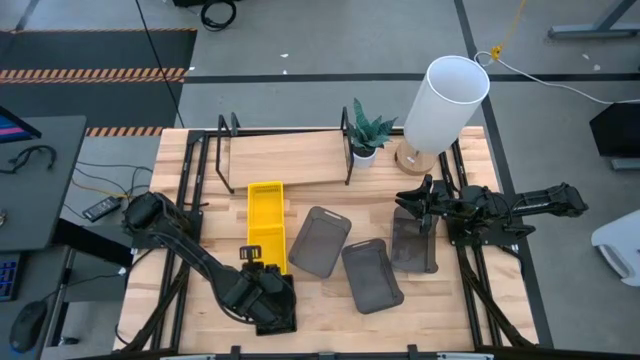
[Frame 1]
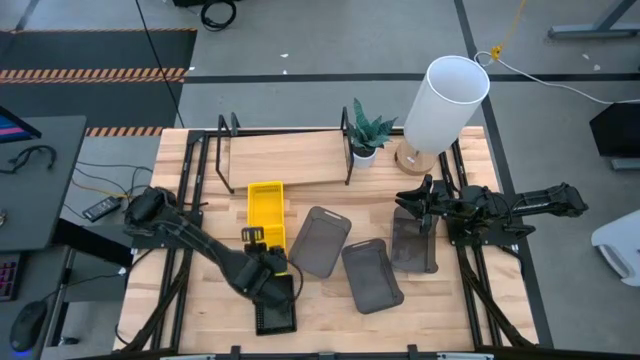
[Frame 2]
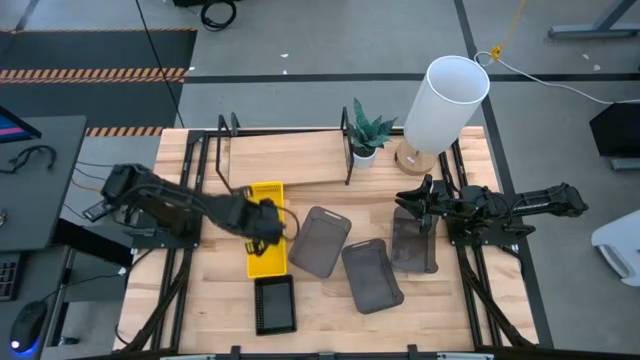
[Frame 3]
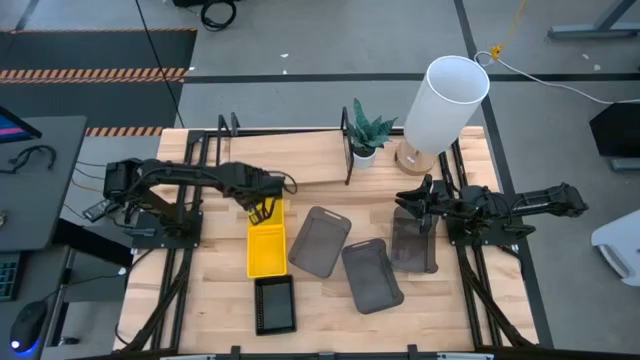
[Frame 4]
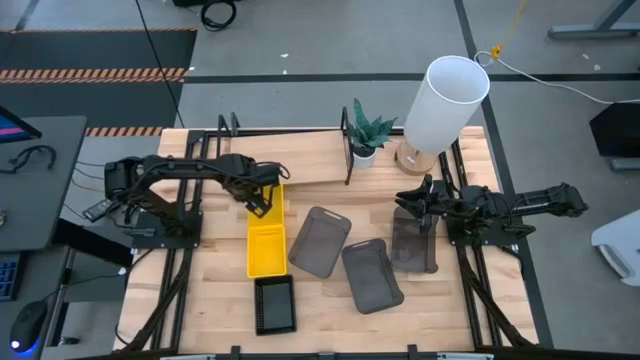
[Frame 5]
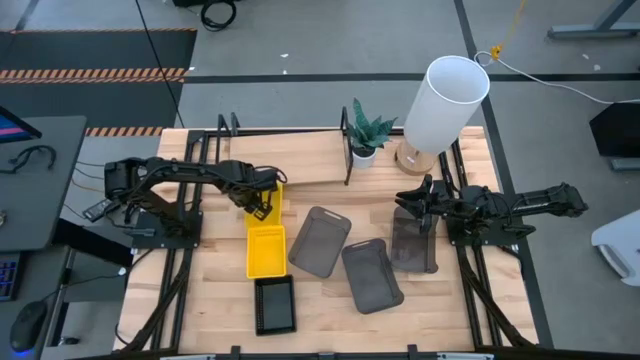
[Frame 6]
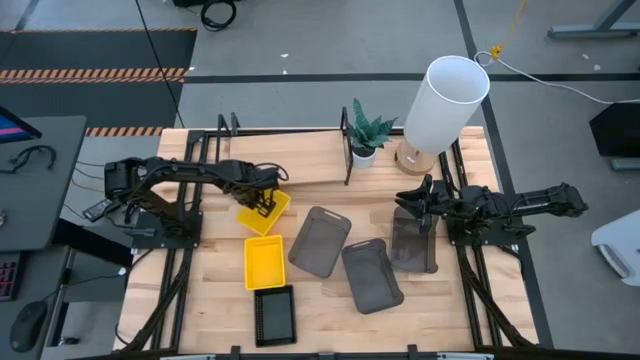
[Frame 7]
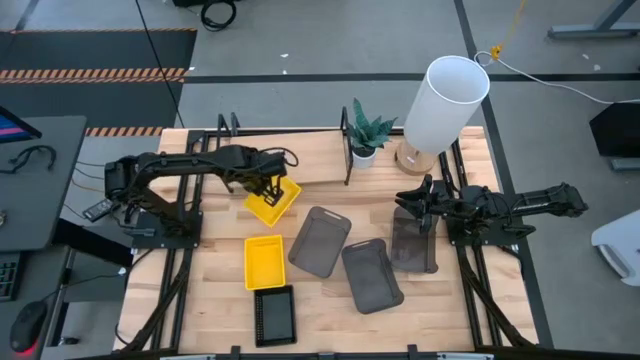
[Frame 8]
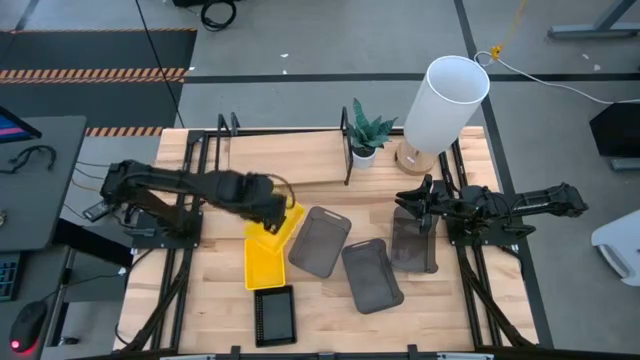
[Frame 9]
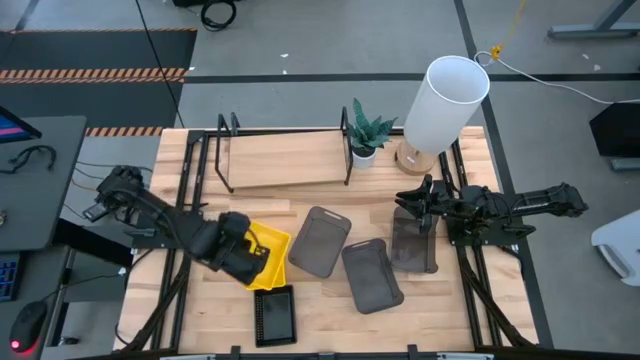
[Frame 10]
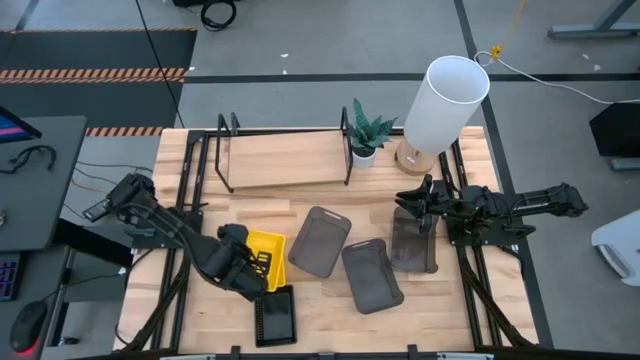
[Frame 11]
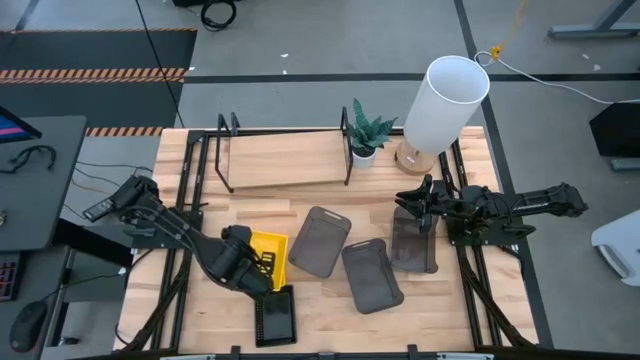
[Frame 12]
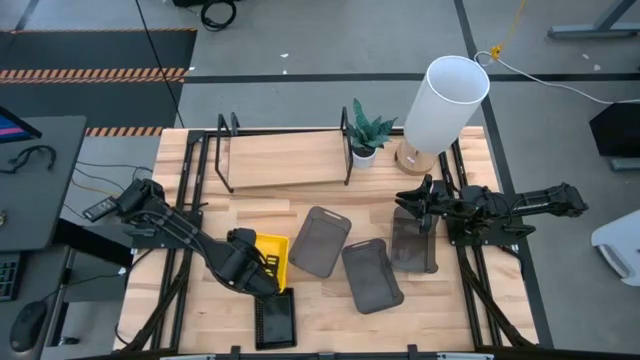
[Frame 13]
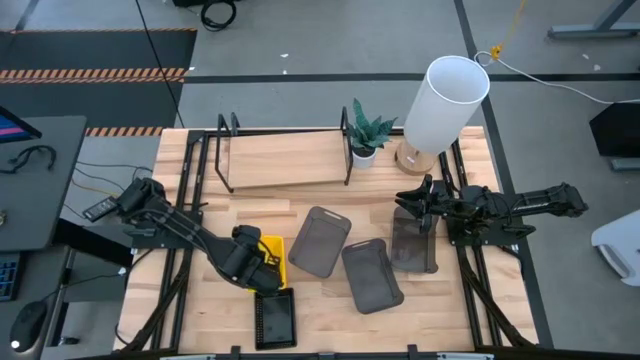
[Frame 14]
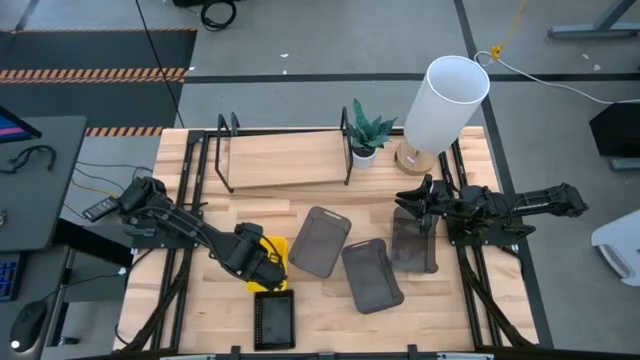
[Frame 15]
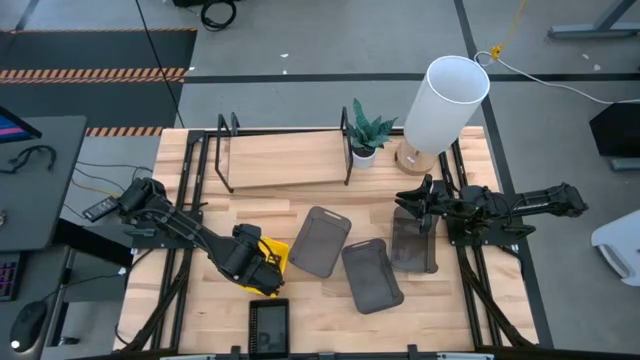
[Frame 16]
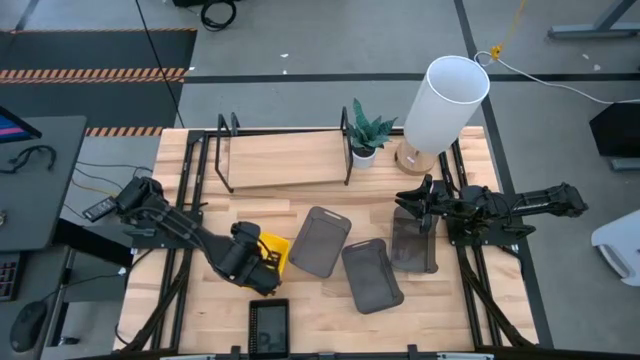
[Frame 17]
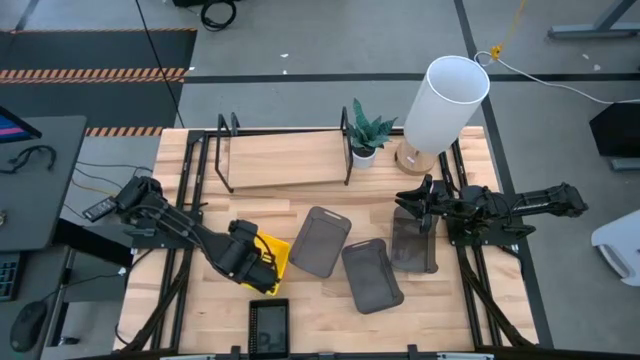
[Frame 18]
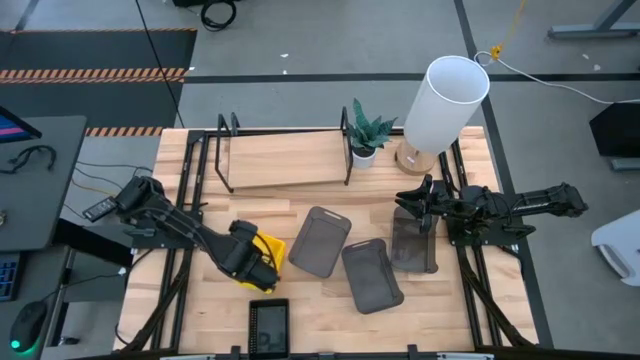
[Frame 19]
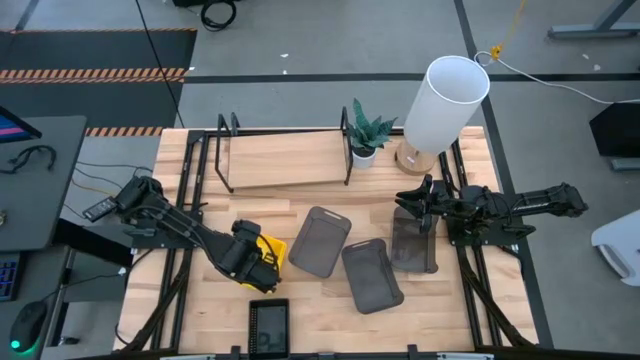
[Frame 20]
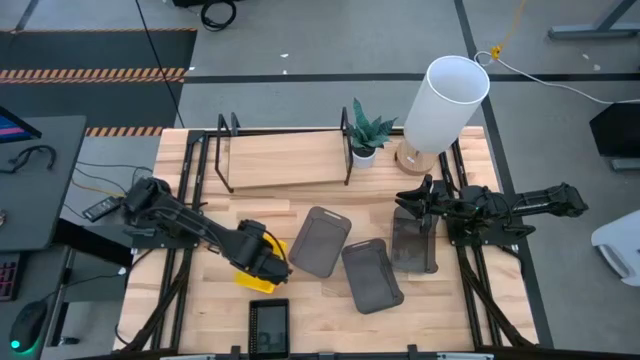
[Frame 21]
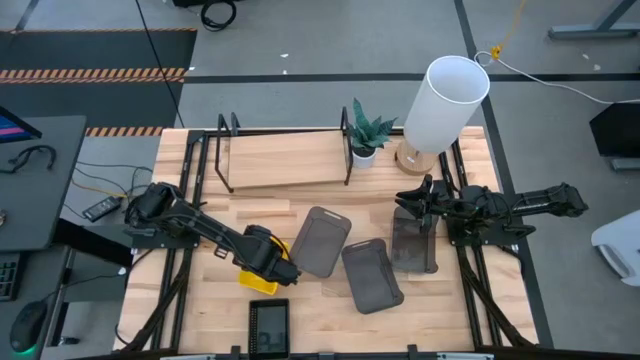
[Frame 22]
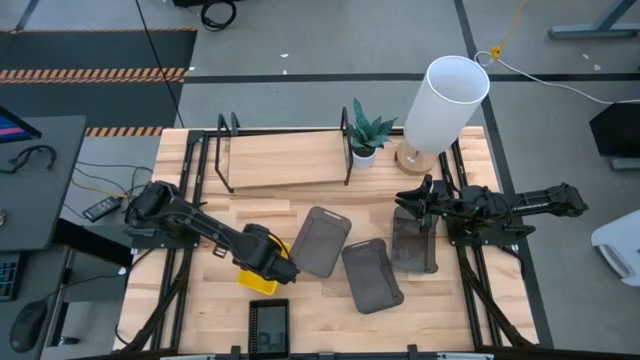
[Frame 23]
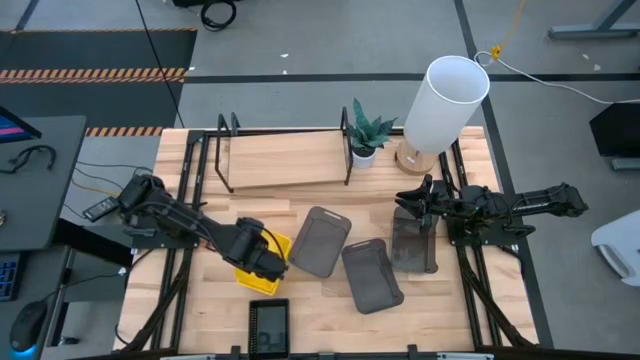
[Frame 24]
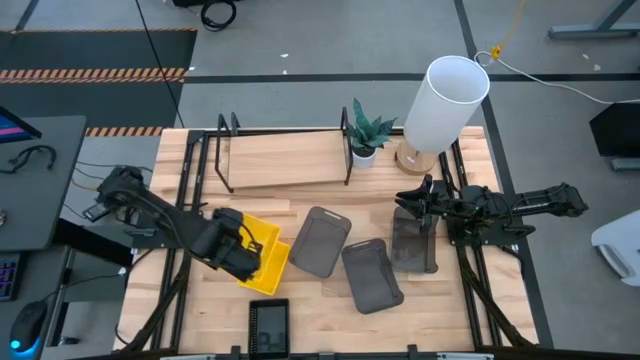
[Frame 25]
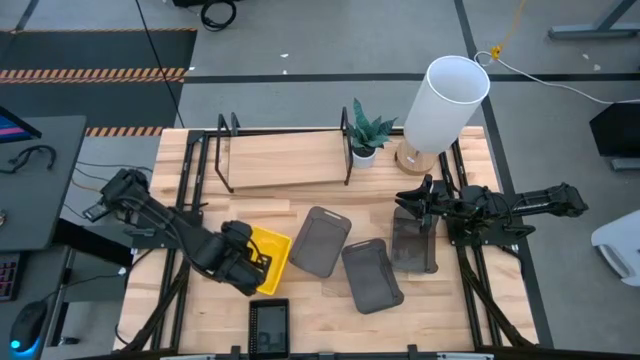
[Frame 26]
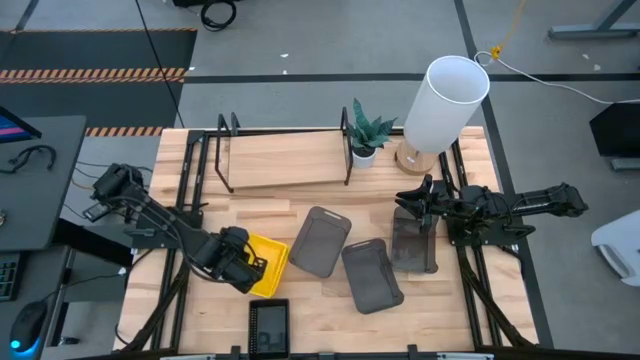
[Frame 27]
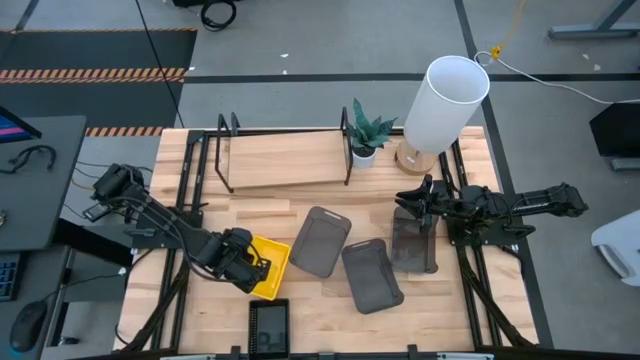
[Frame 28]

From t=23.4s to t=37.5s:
Task: Stack baskets on shelf by color
Stack the top yellow basket on top of the bottom yellow basket

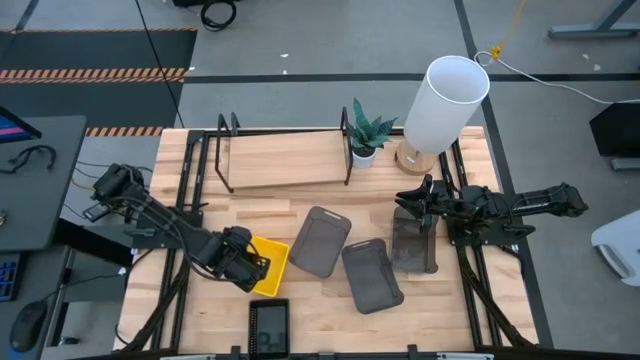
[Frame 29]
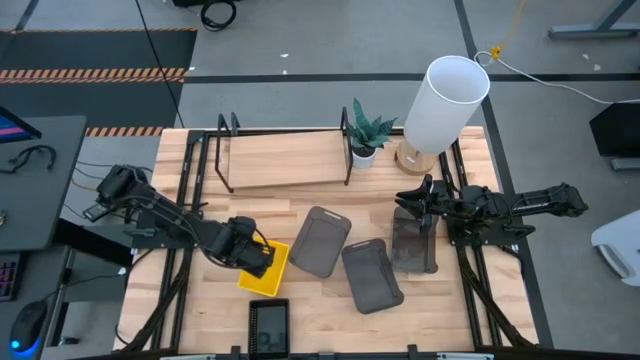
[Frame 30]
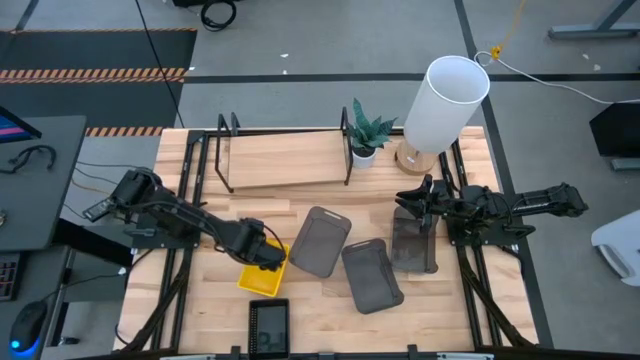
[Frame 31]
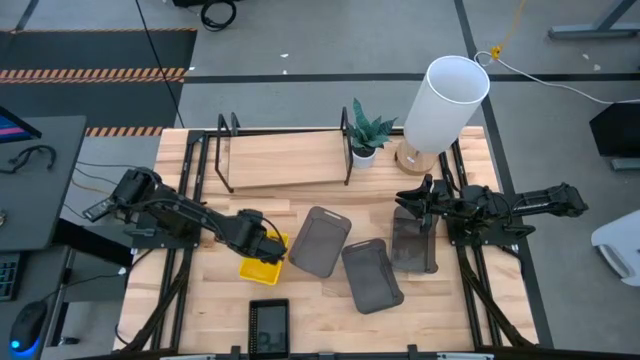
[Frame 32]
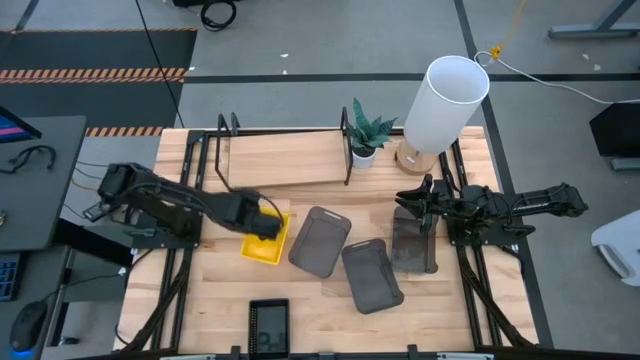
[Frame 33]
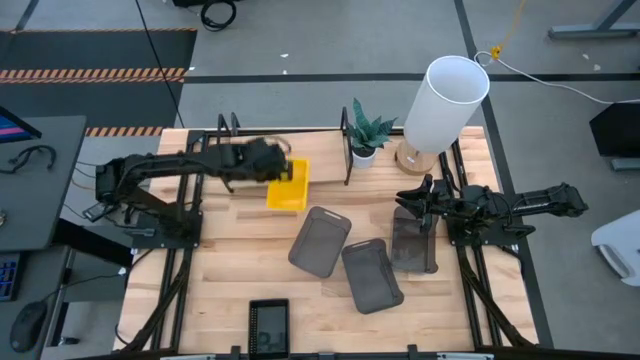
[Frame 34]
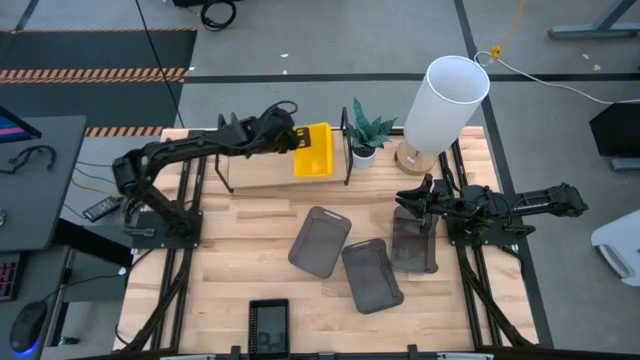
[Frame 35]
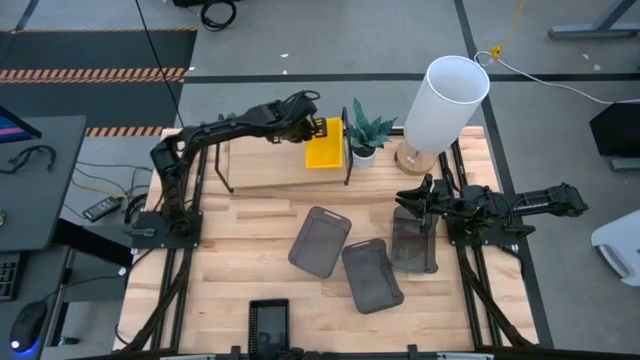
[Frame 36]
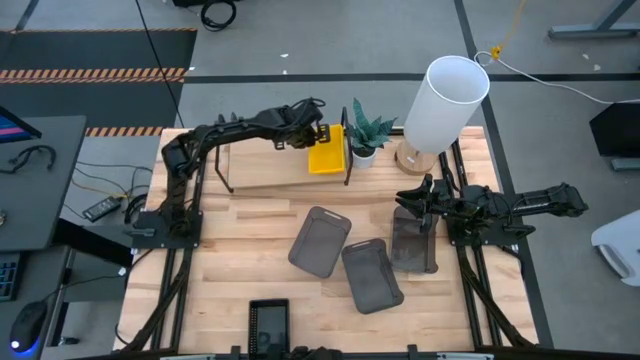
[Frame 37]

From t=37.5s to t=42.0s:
Put the stacked yellow basket on the shelf

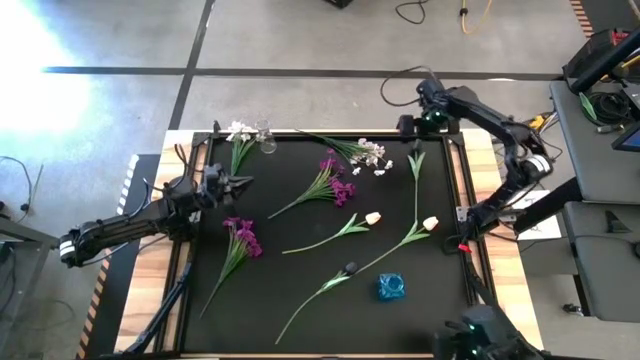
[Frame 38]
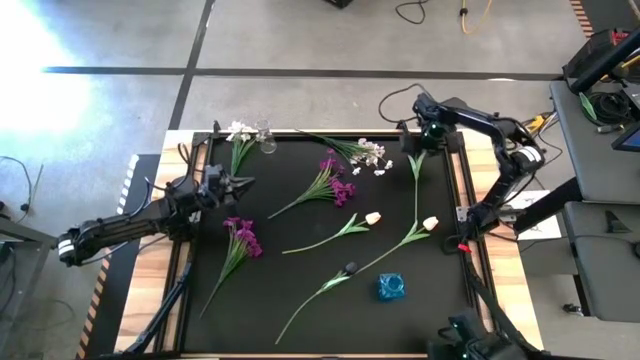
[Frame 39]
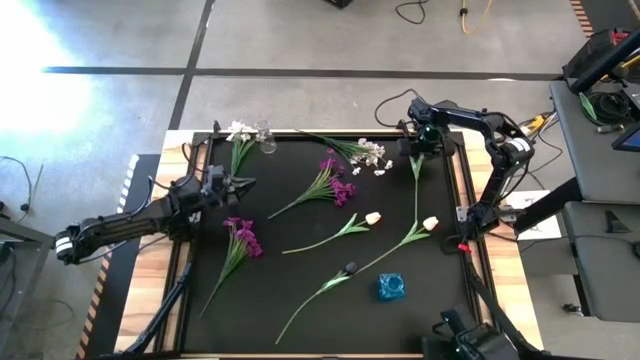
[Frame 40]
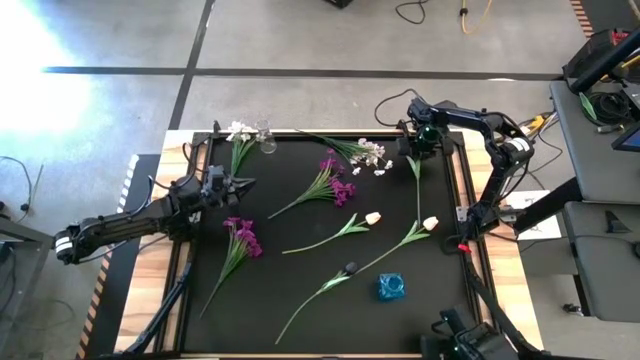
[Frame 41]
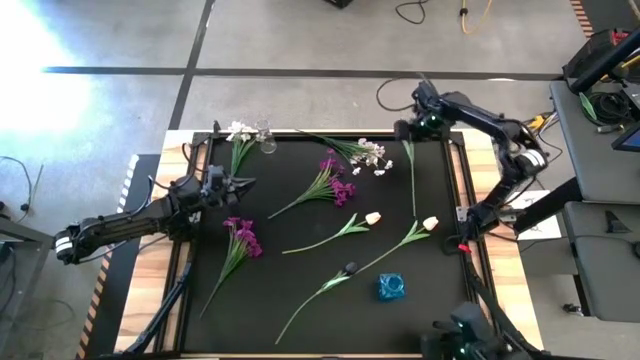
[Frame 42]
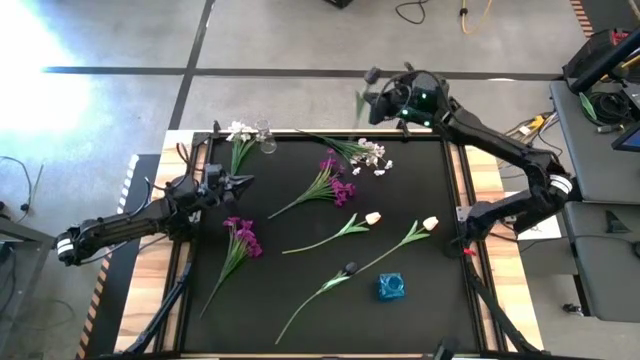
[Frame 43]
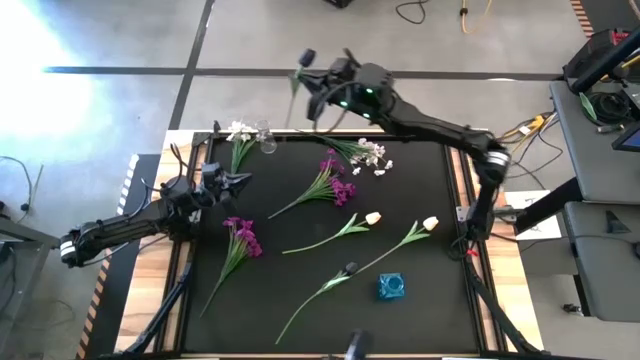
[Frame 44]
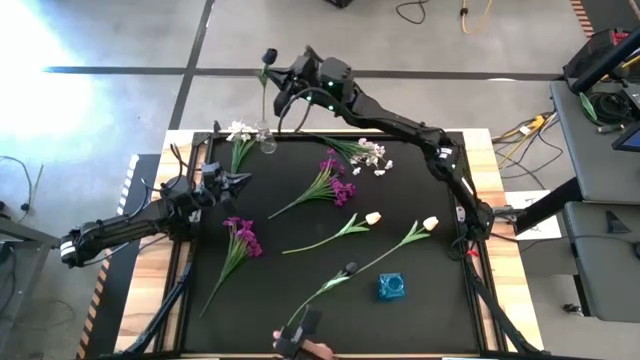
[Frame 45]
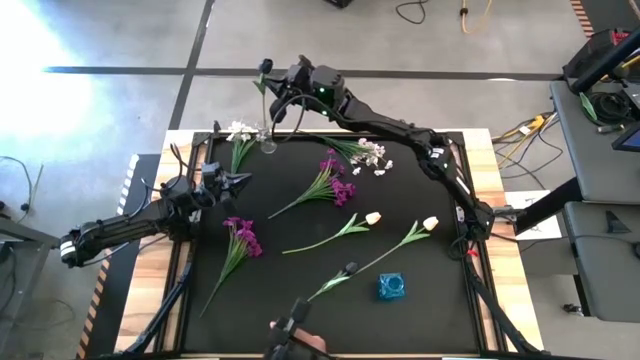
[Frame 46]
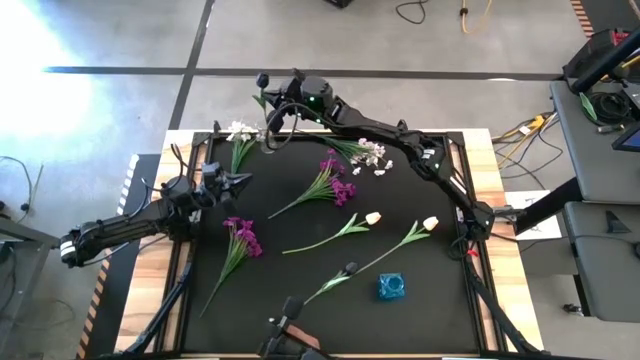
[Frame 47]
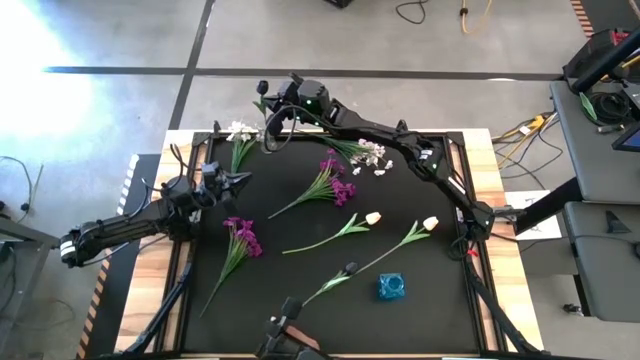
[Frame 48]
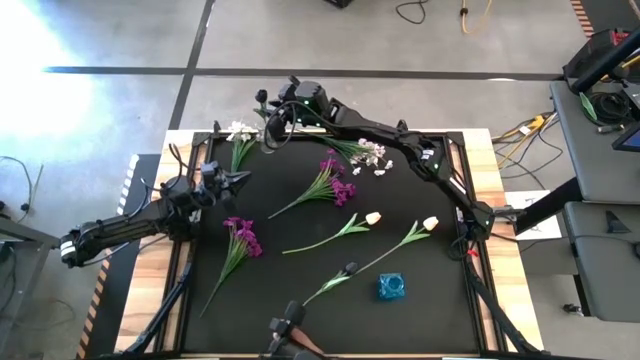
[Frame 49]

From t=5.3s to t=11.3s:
Task: Sort flowers into vase by color
Put the top black tulip into the transparent vase
